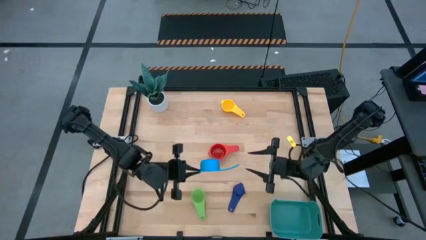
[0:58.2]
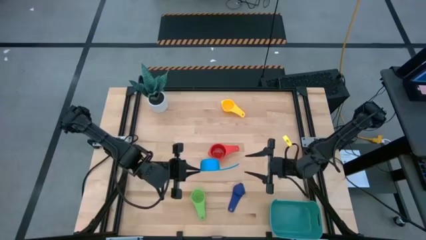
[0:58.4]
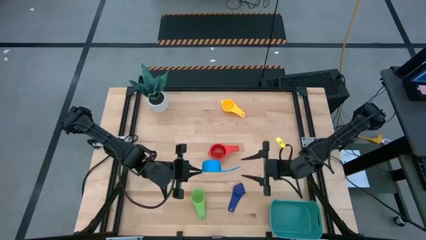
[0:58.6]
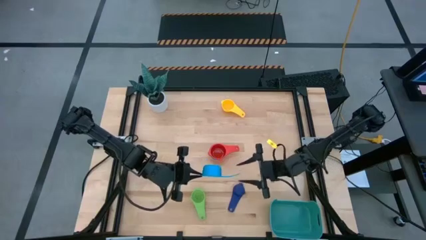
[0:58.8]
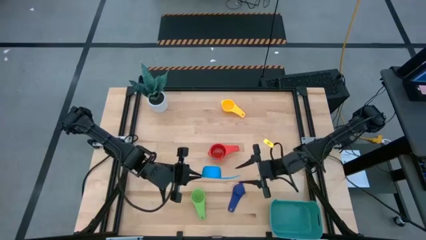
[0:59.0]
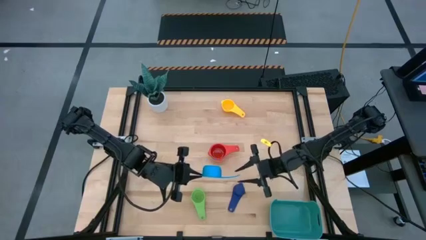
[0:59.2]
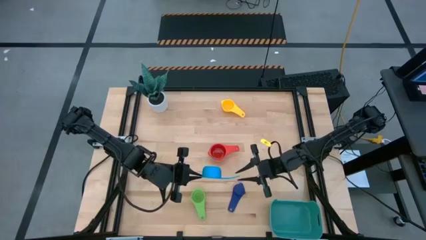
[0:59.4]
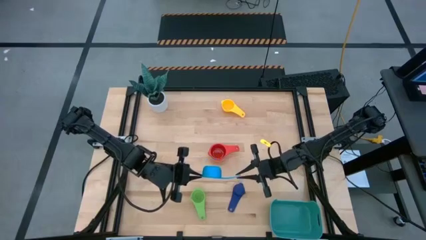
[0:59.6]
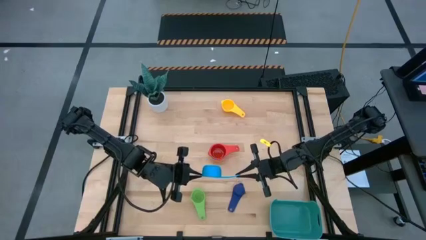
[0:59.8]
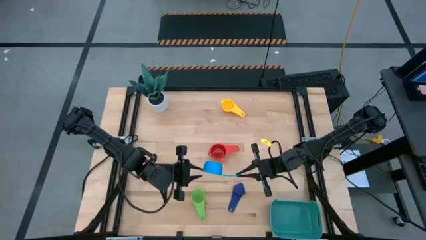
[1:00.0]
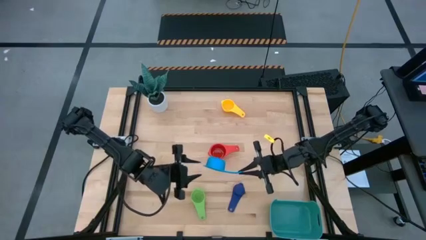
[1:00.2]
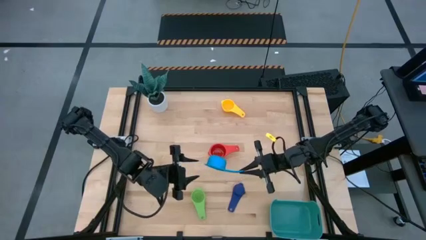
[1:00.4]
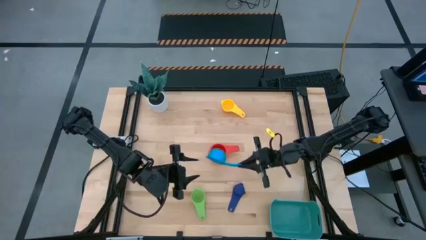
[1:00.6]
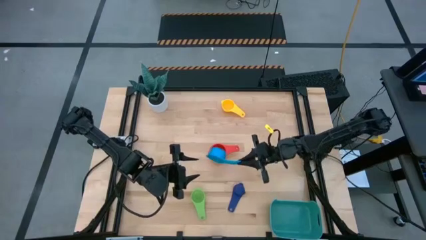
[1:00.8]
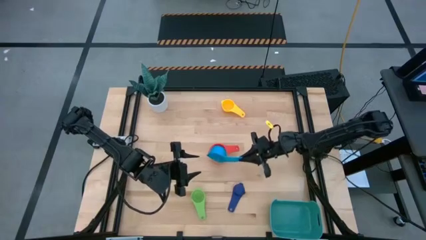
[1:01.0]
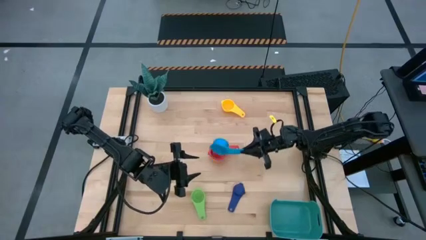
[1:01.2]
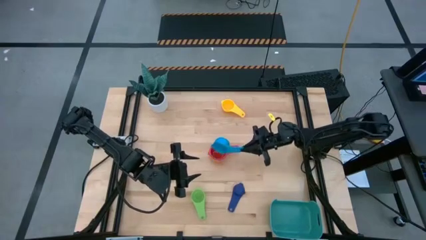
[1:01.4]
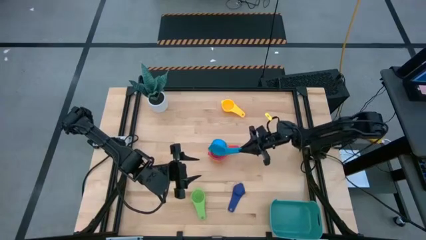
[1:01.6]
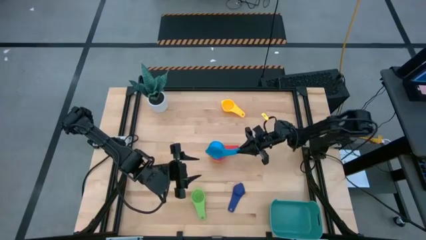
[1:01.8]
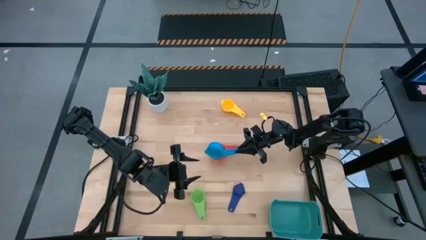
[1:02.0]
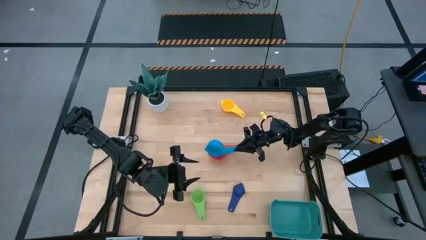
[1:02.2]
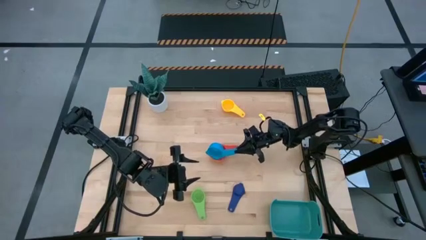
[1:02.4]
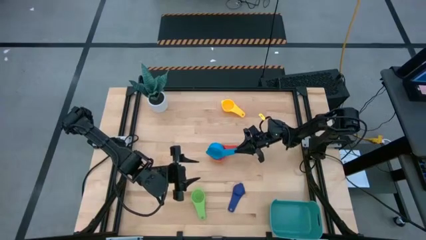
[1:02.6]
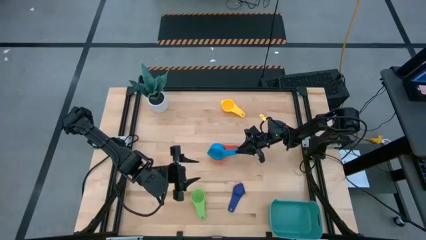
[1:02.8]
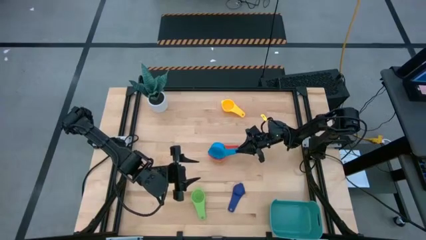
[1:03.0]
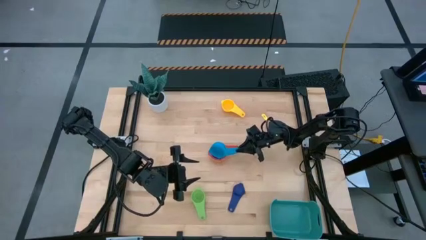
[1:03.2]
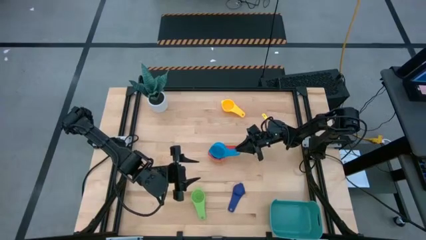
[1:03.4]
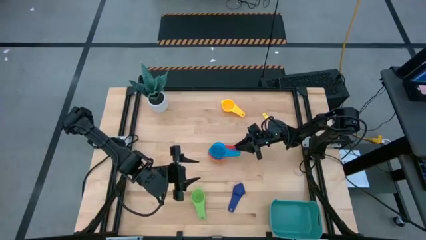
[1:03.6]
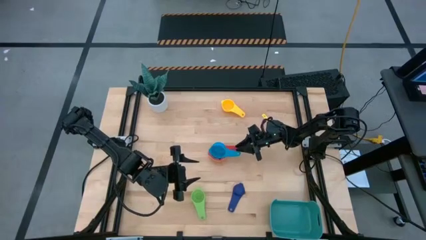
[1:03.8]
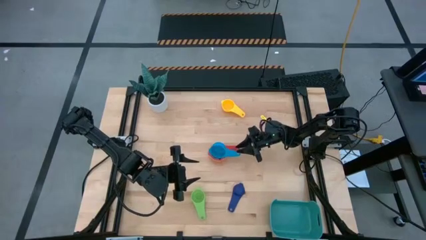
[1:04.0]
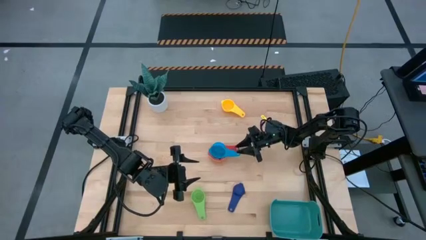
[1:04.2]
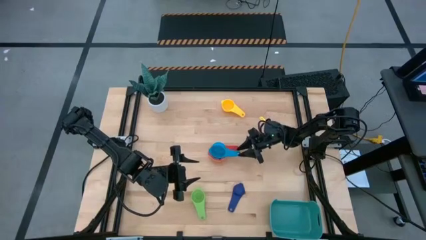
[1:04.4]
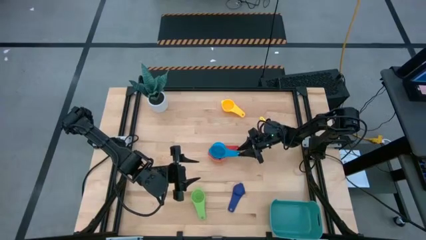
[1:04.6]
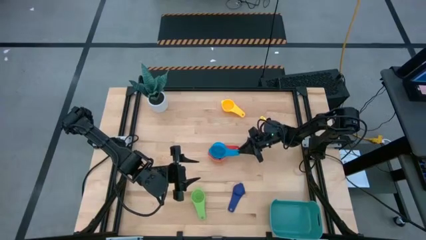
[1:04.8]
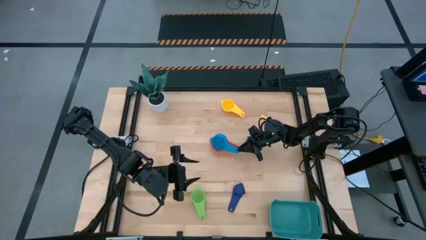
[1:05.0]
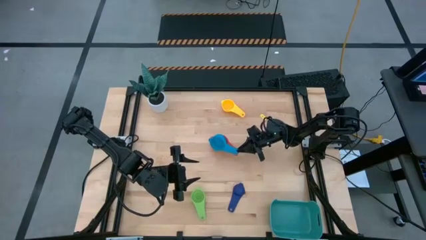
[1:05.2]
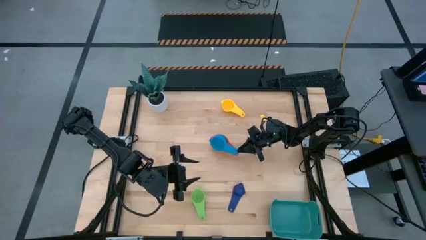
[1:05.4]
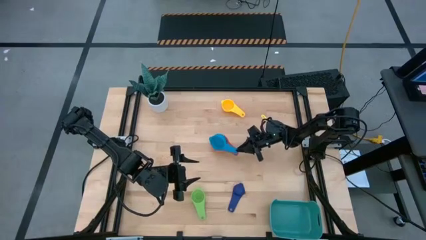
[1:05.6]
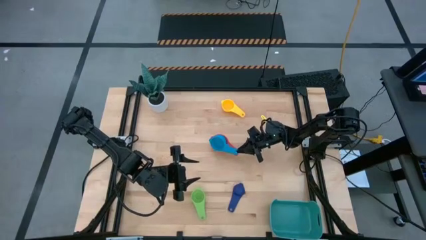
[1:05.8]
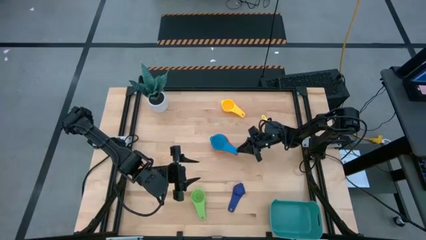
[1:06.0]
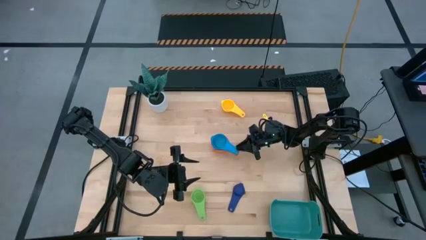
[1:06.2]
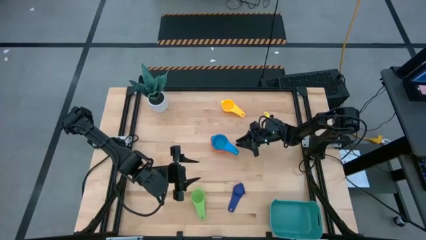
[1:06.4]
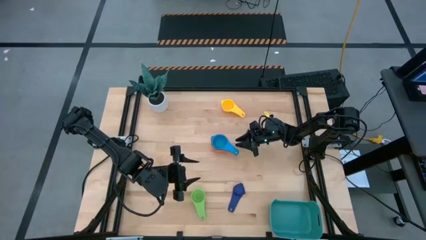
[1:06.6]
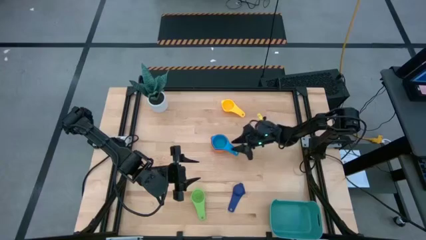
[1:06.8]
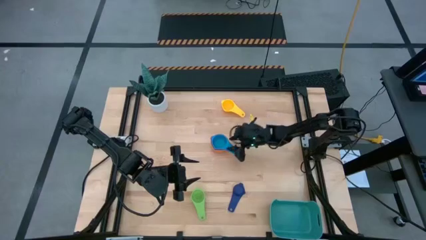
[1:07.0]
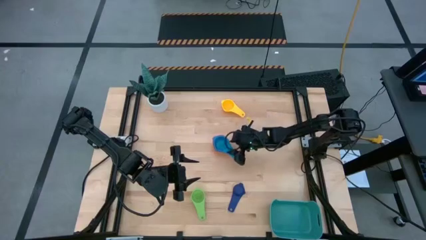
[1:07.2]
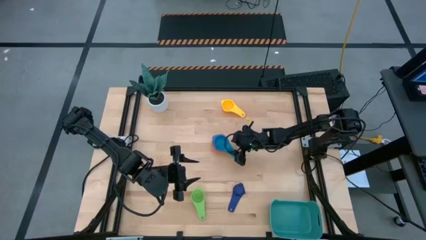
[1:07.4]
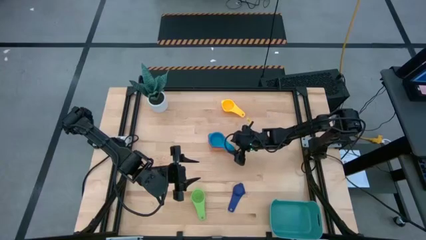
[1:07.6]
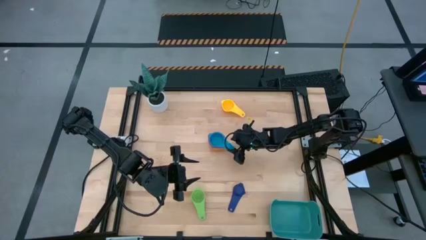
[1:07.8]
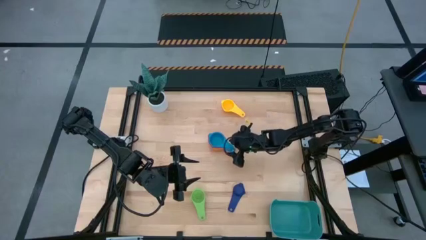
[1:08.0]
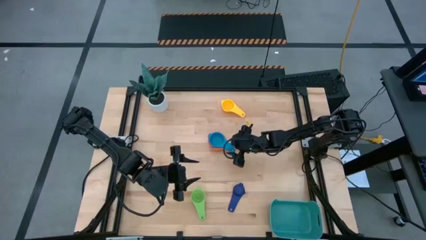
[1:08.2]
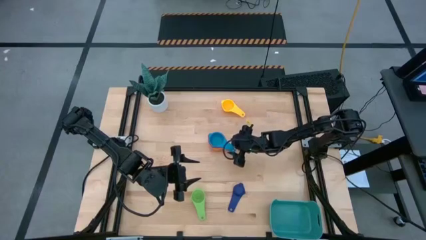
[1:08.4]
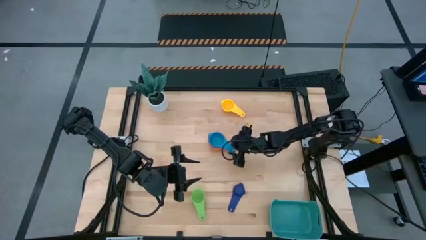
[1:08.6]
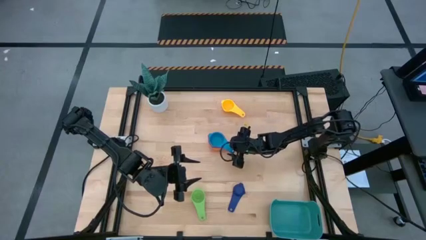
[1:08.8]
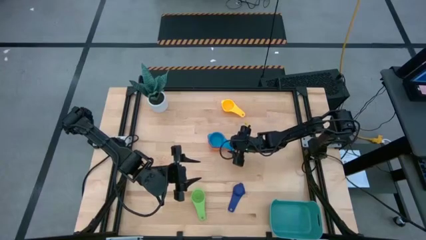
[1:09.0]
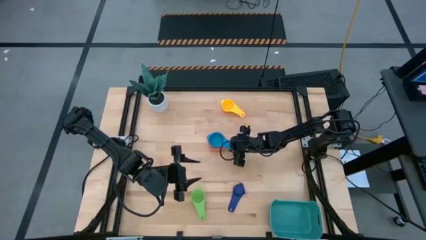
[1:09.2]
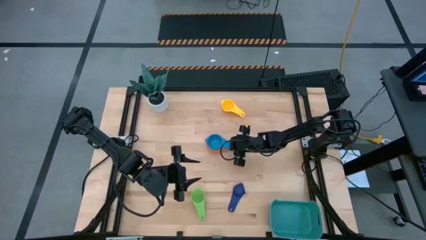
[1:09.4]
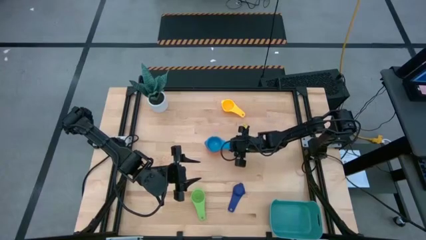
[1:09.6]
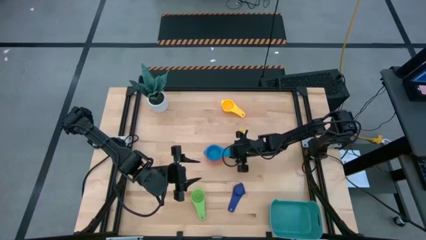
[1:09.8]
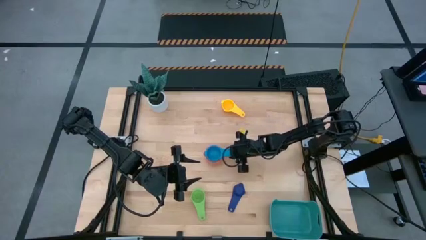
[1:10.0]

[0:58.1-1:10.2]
Task: Nest measuring cups in basket
Stack the light blue measuring cup on top of the orange measuring cup
